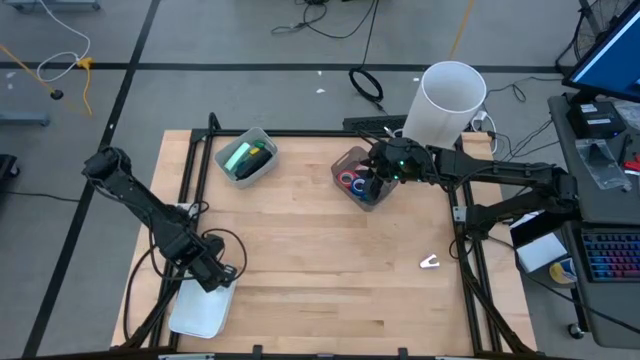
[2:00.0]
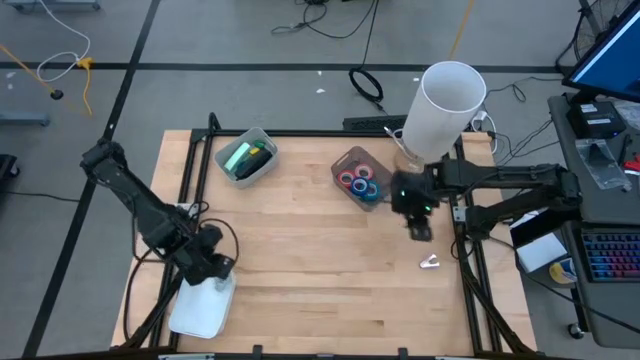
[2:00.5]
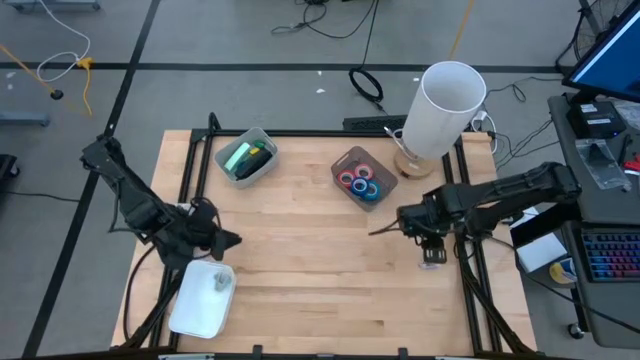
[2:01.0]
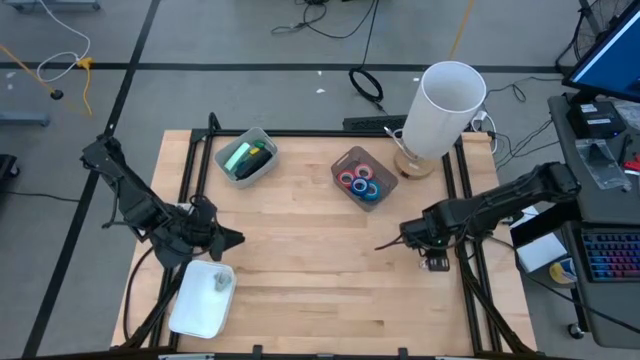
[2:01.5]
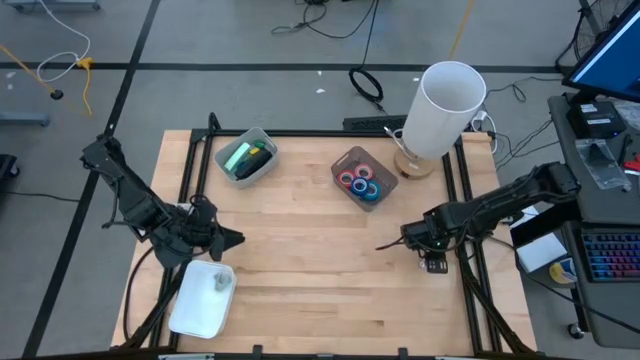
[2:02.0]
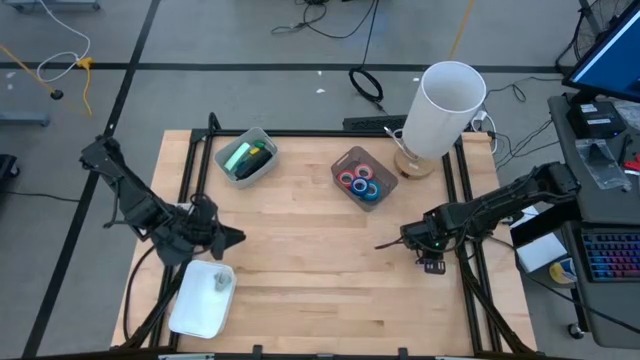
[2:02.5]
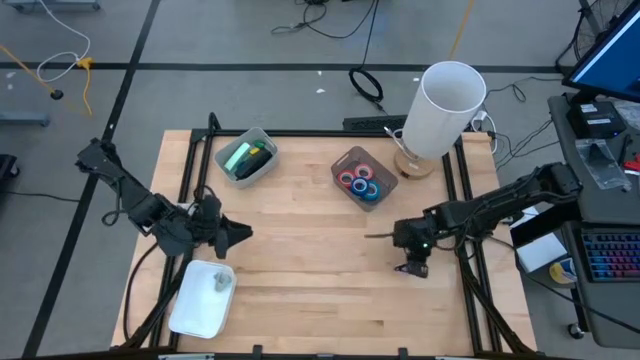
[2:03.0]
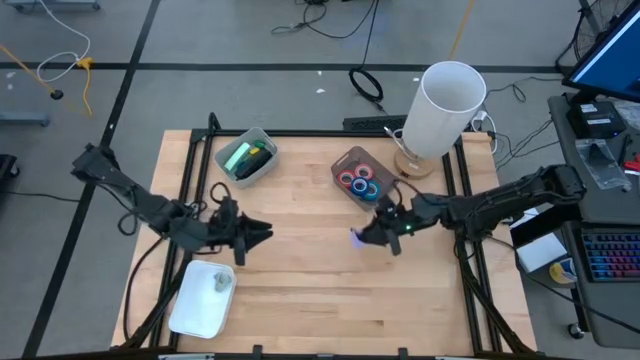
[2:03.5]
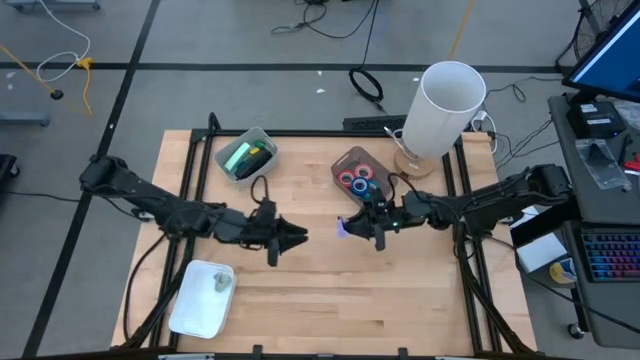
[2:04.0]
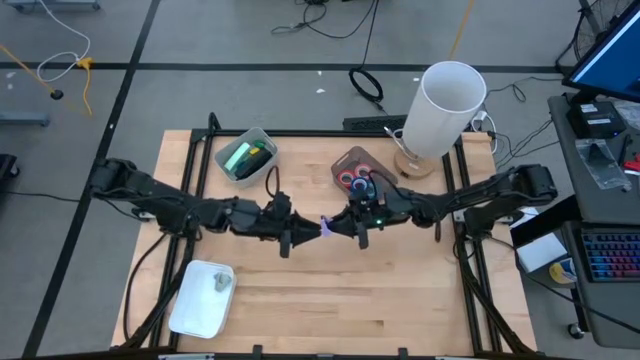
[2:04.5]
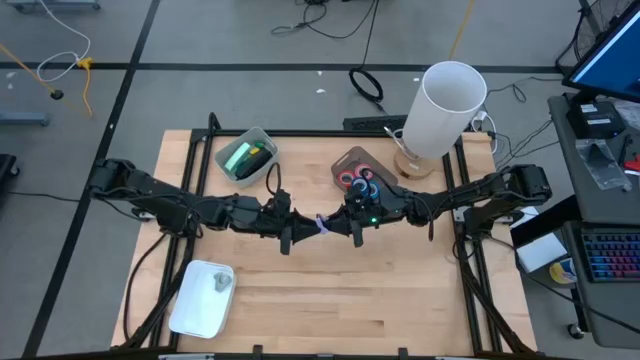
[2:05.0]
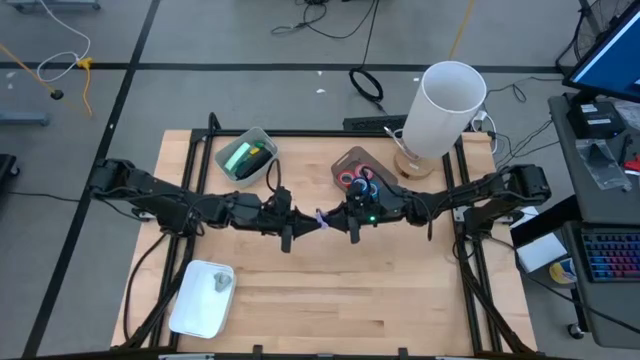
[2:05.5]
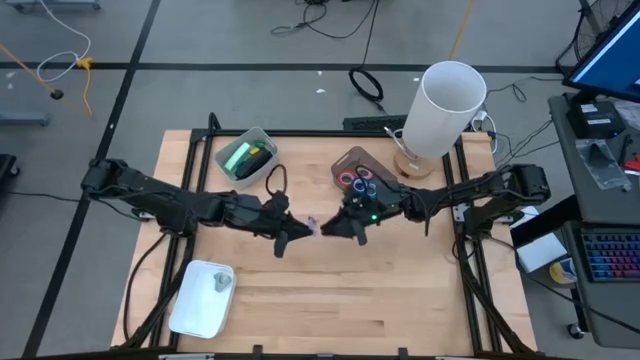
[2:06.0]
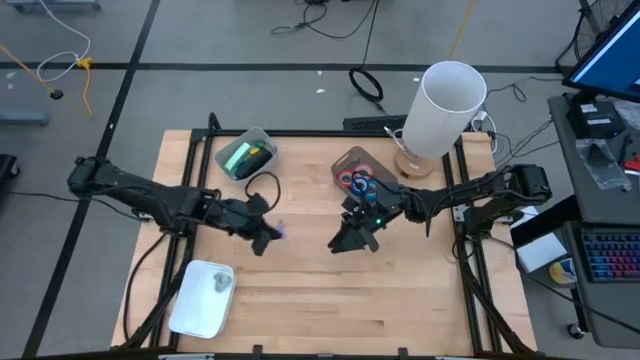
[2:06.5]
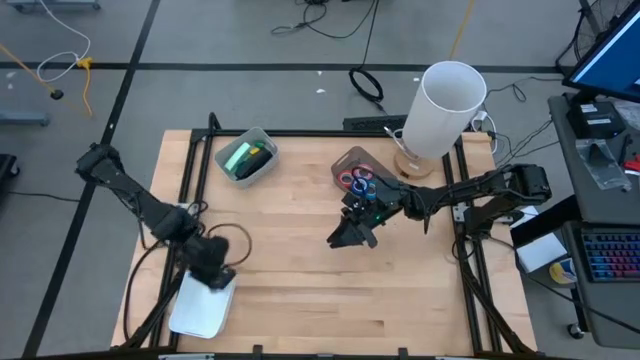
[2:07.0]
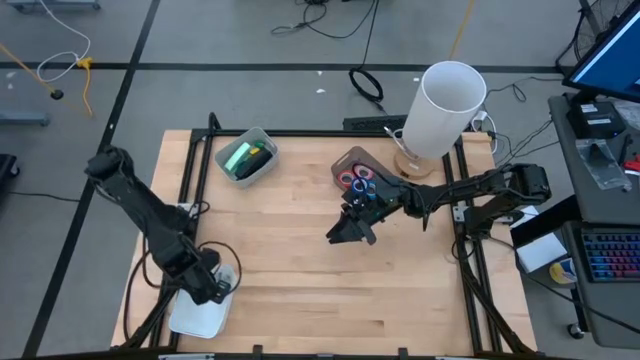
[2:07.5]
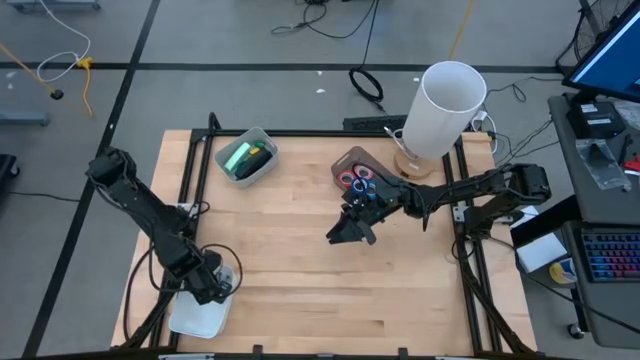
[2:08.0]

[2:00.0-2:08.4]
Task: Pick and place Stapler, Stapler remover, tape
Put the purple staple remover into the white bin

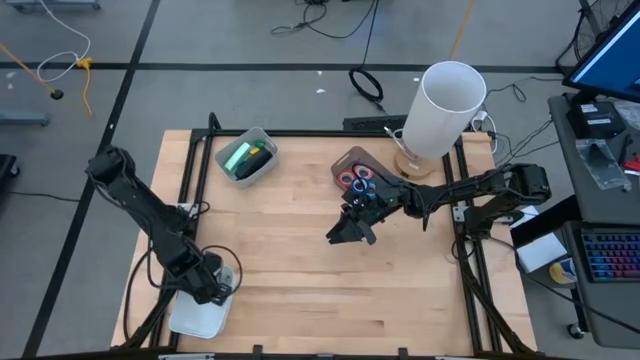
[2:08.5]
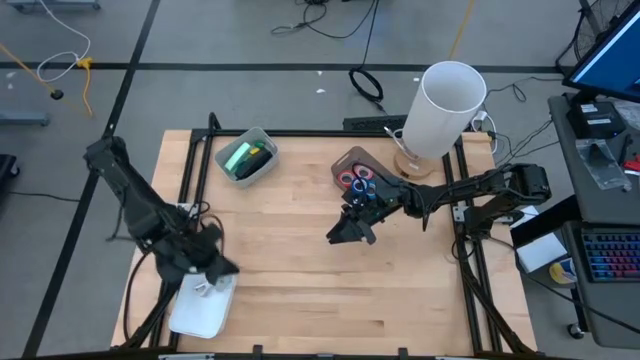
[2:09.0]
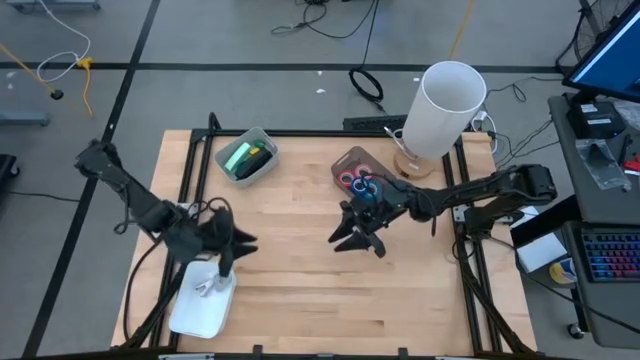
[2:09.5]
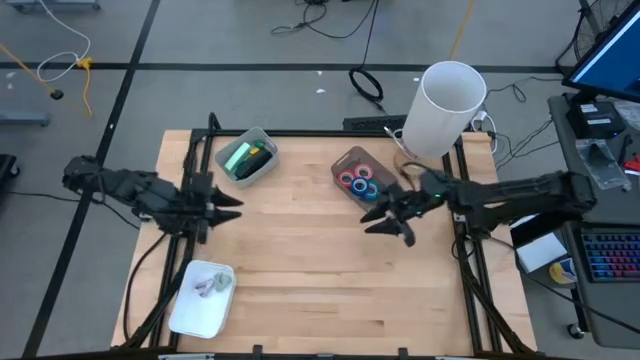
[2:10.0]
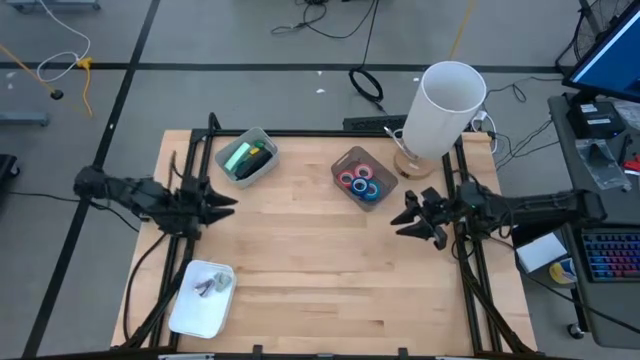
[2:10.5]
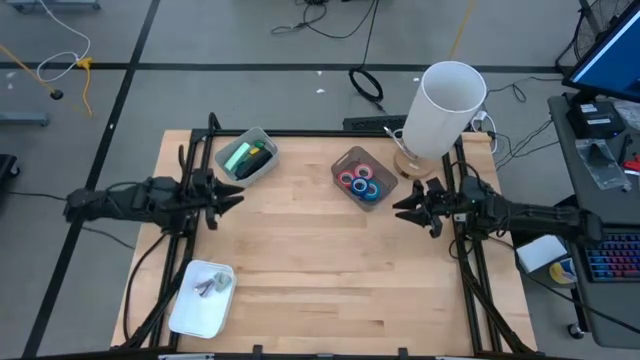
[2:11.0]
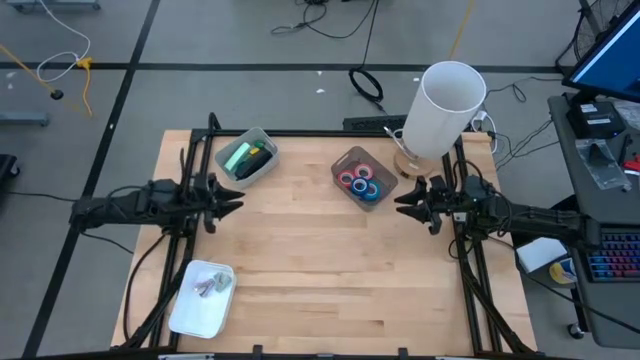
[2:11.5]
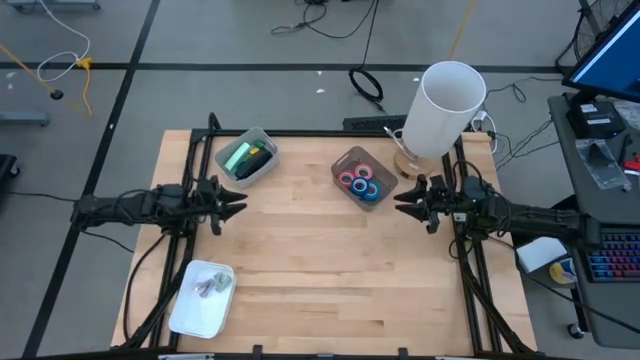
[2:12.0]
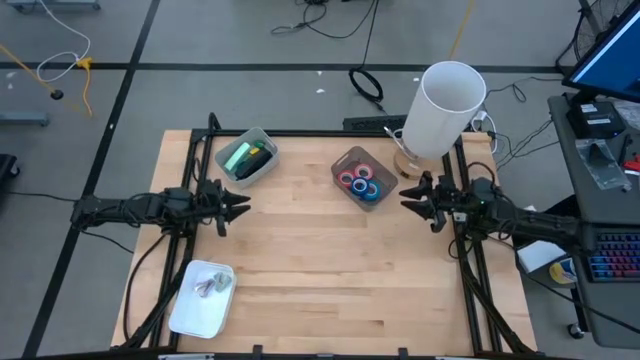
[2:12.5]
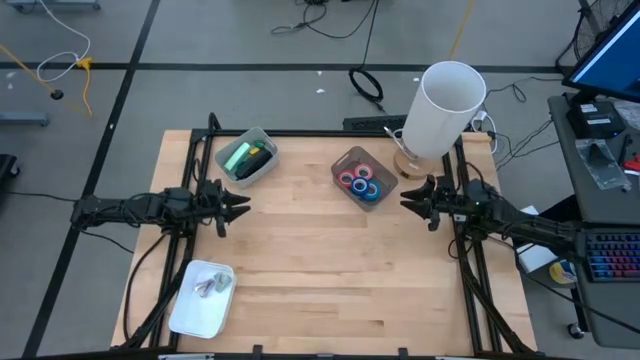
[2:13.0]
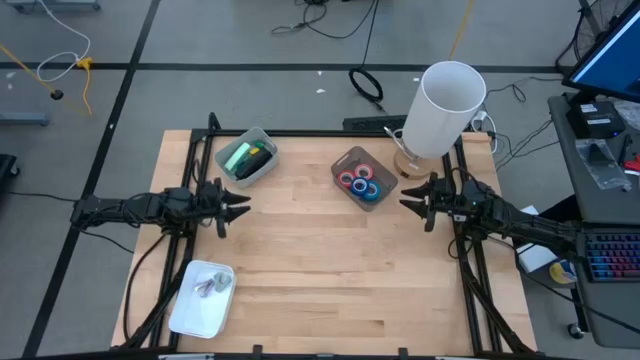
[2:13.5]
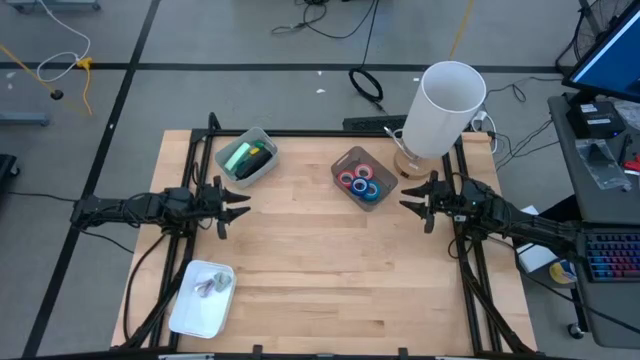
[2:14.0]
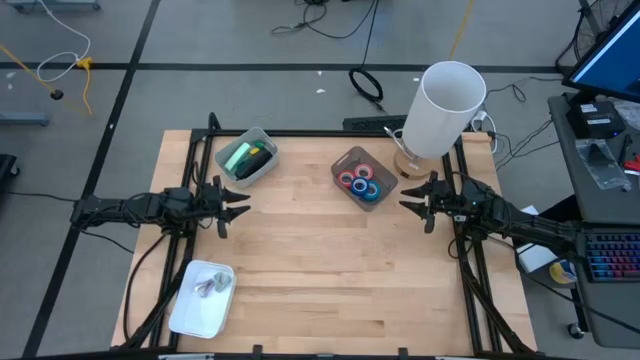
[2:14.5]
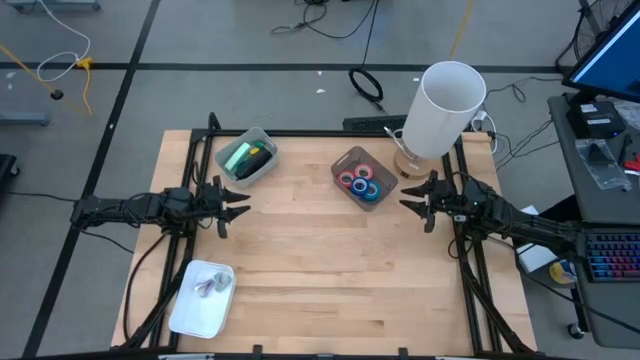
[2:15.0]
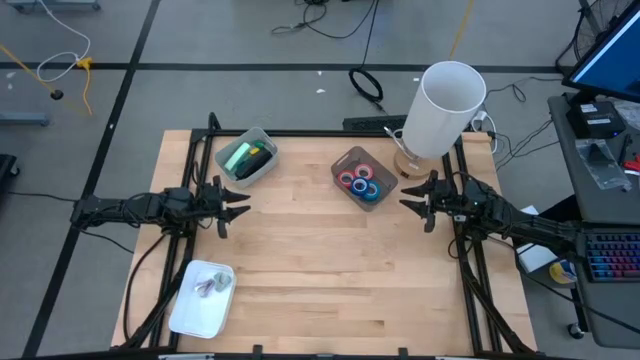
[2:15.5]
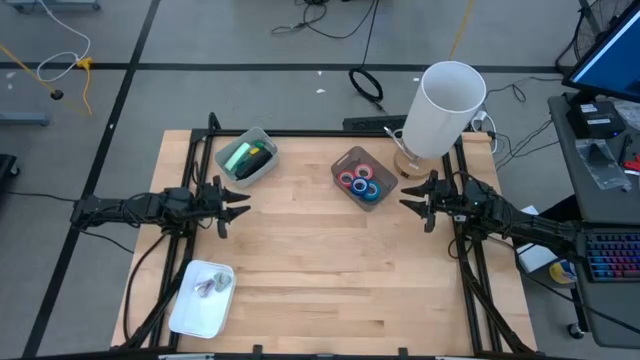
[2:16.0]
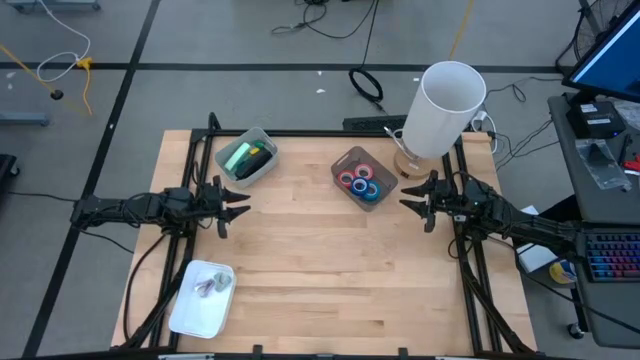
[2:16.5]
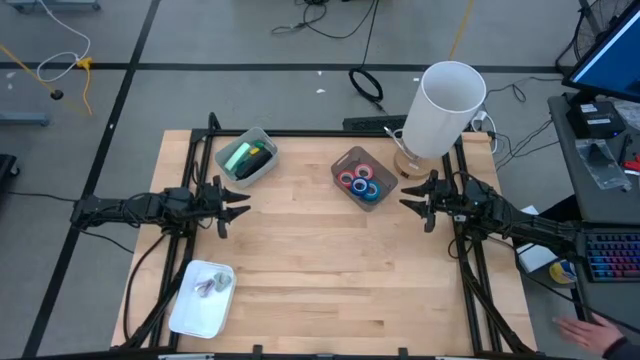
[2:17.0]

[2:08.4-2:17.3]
Return to Home Position

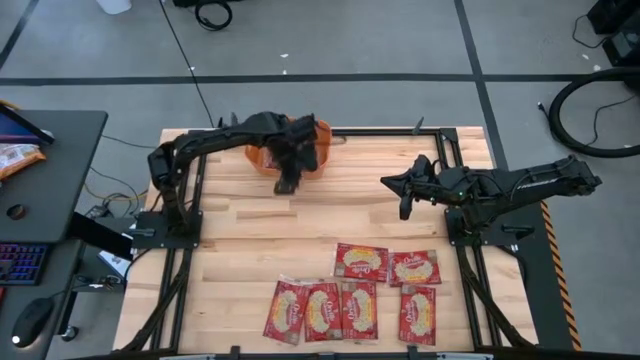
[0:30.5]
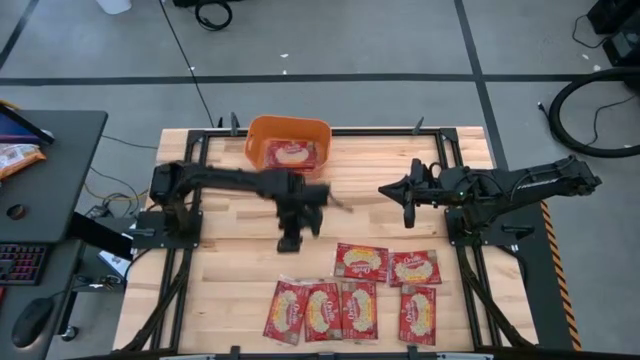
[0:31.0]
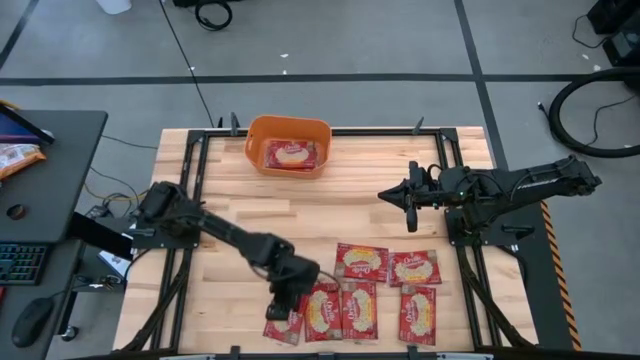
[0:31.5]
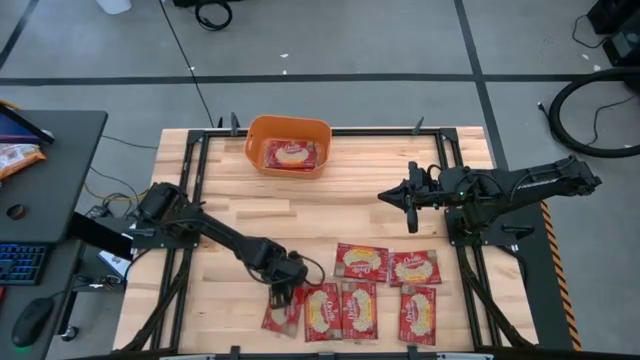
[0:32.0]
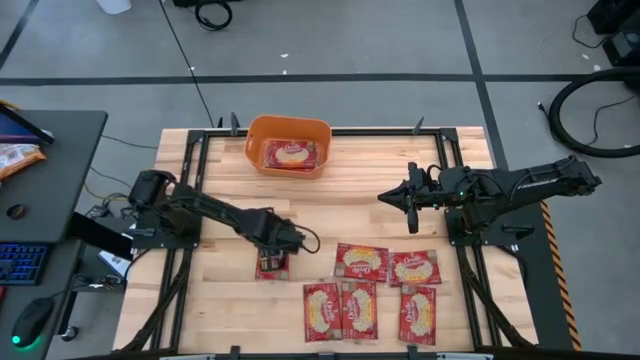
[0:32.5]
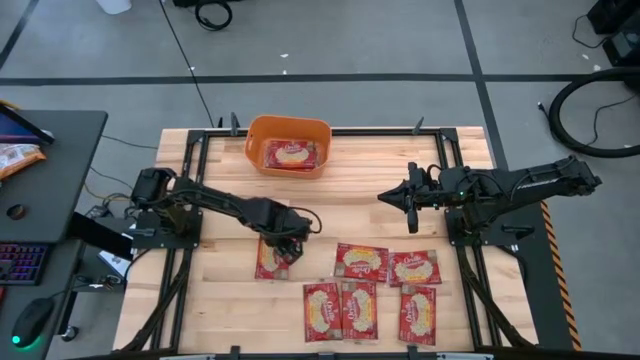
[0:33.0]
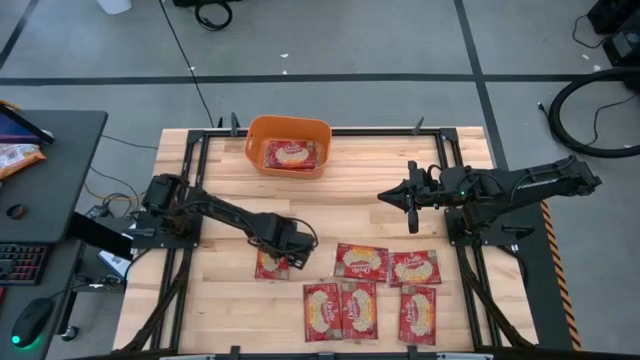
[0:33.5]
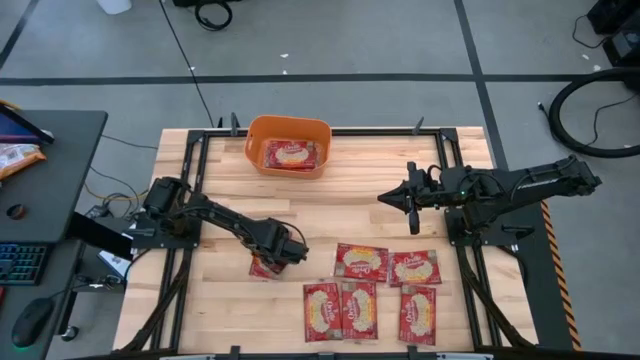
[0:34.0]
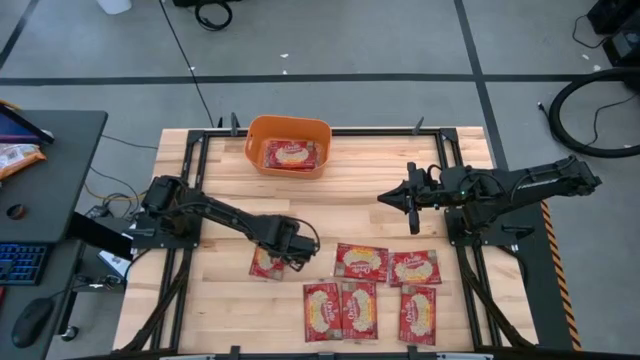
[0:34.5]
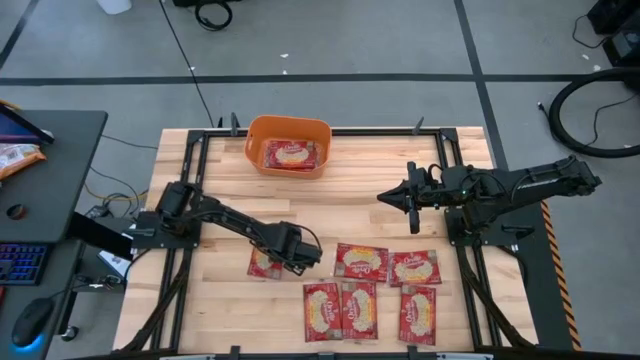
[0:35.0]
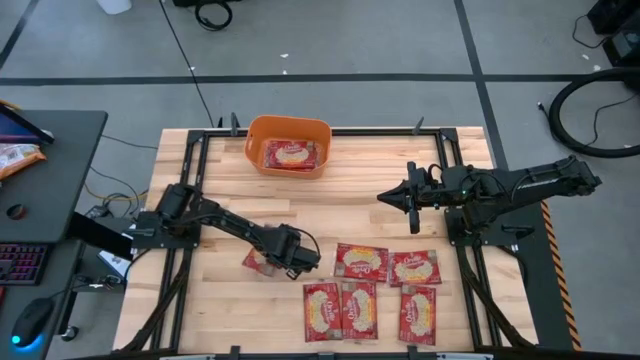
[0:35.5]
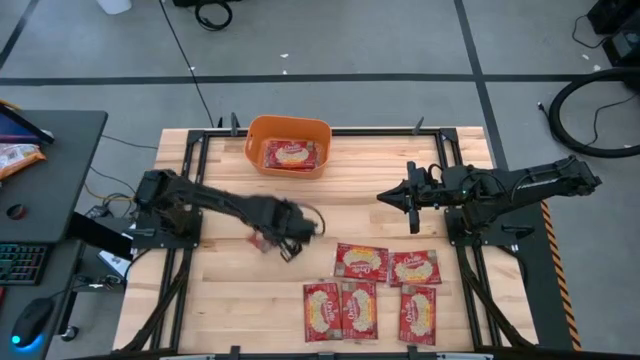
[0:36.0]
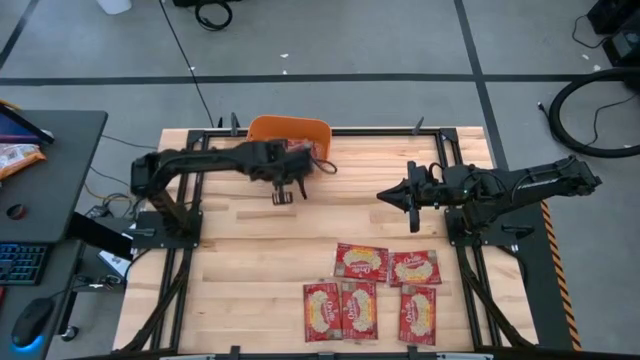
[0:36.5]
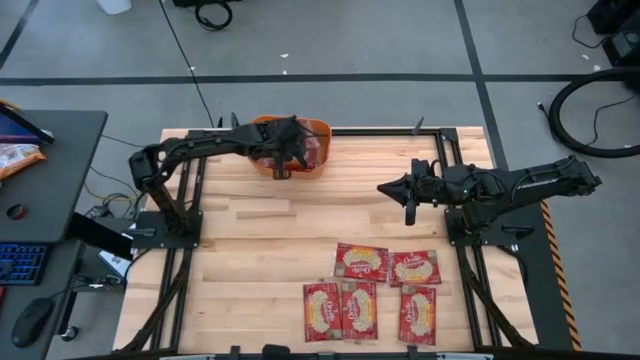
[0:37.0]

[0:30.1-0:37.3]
Task: Sort popcorn bags into baskets
Put the red popcorn bag into the orange container
